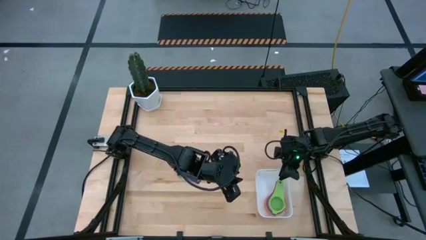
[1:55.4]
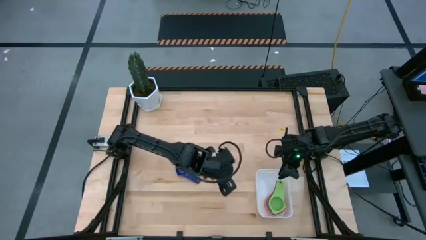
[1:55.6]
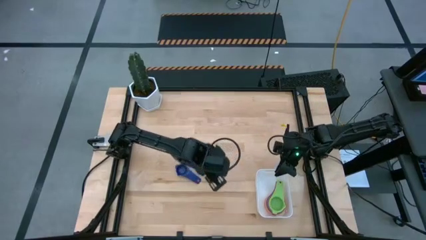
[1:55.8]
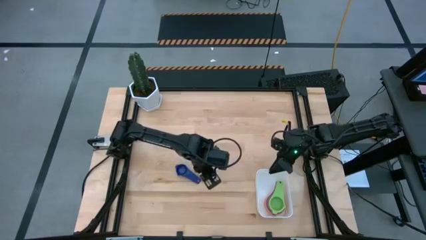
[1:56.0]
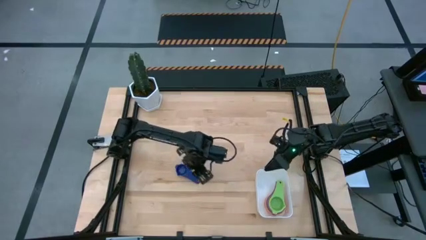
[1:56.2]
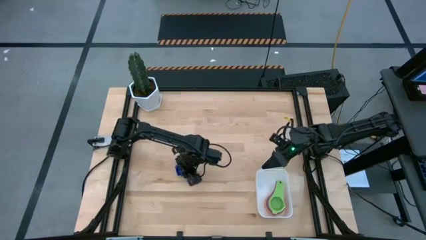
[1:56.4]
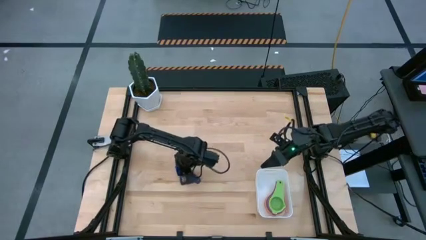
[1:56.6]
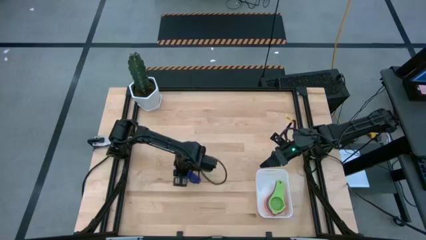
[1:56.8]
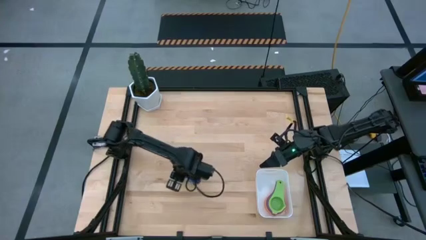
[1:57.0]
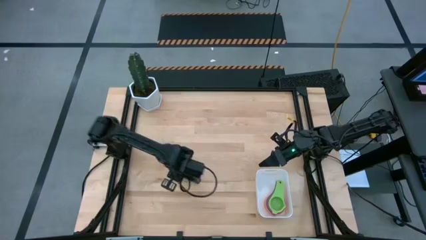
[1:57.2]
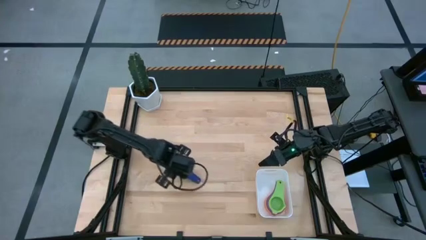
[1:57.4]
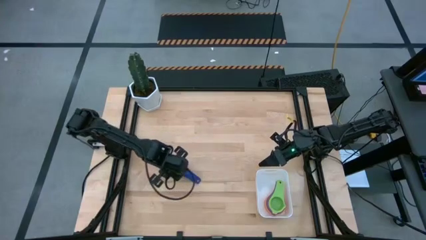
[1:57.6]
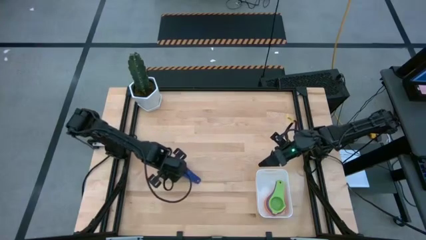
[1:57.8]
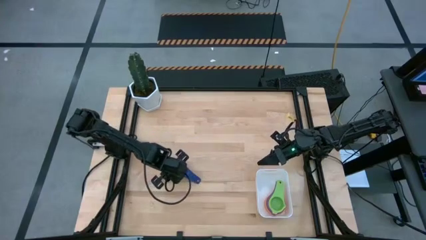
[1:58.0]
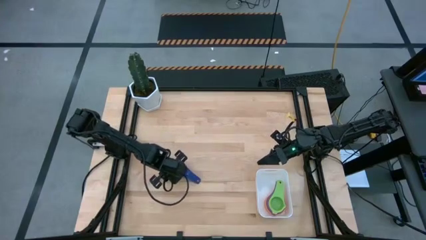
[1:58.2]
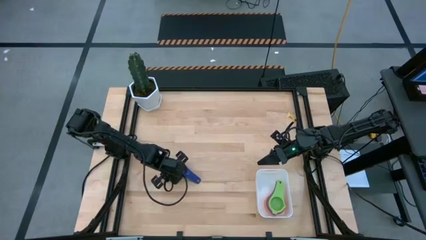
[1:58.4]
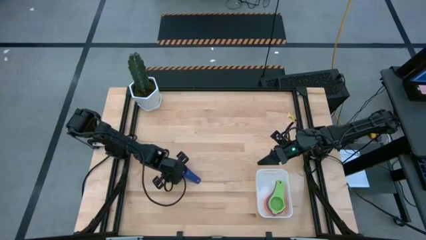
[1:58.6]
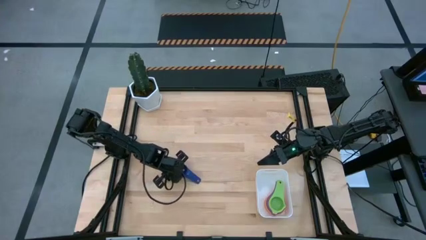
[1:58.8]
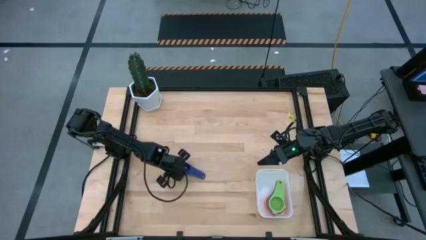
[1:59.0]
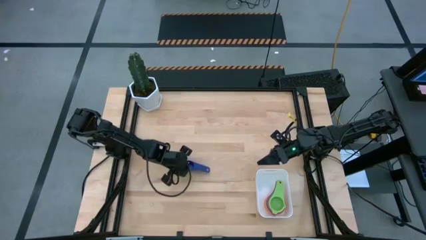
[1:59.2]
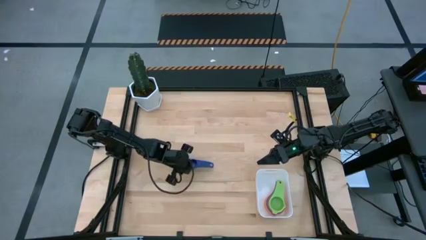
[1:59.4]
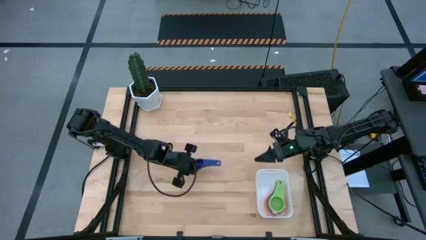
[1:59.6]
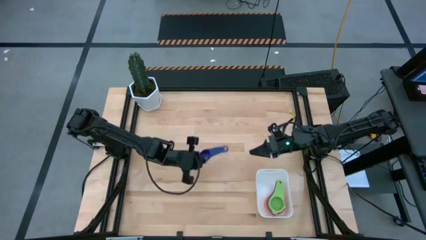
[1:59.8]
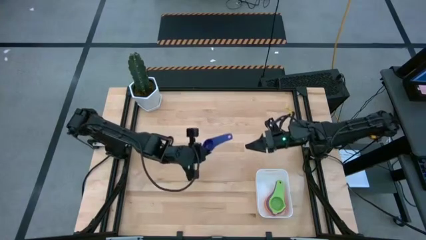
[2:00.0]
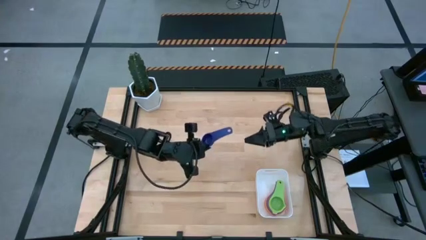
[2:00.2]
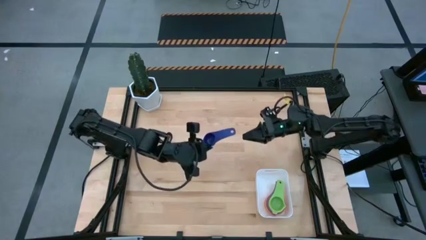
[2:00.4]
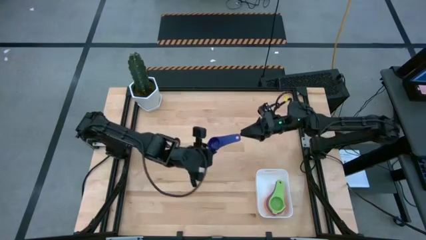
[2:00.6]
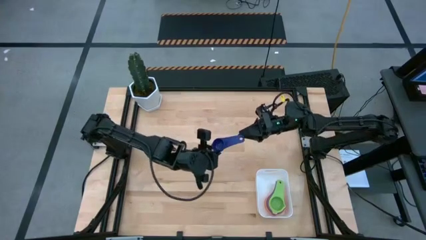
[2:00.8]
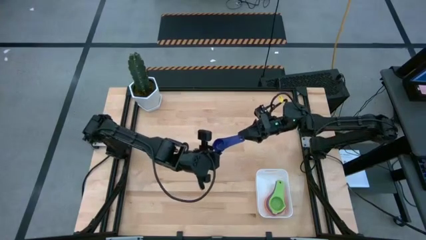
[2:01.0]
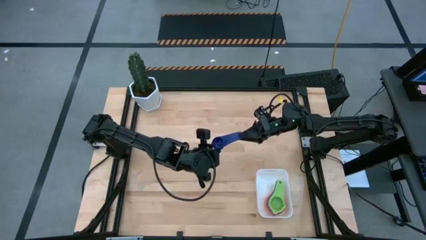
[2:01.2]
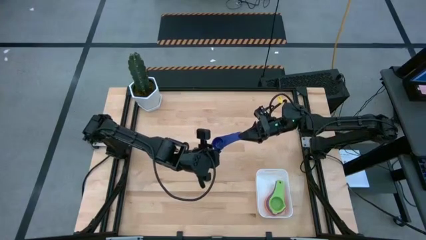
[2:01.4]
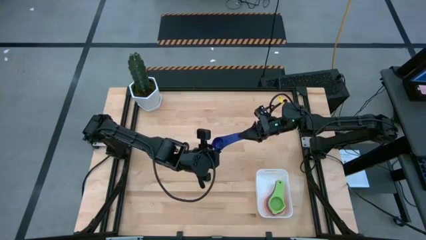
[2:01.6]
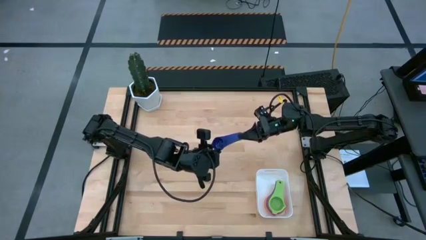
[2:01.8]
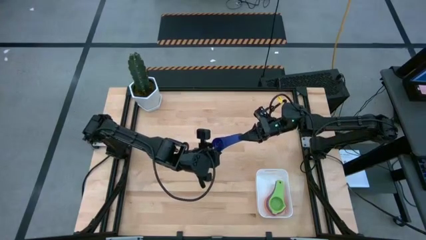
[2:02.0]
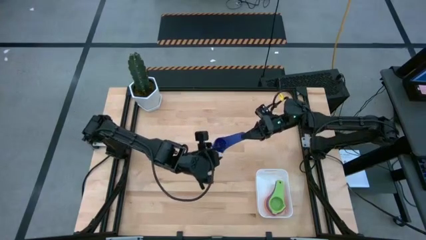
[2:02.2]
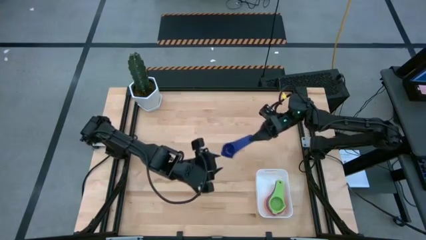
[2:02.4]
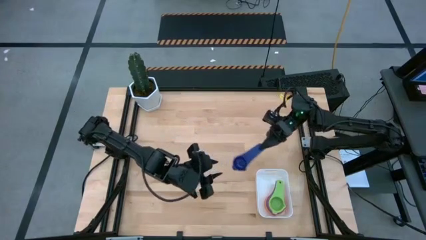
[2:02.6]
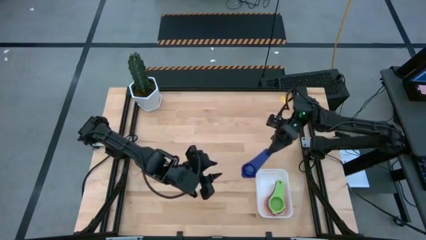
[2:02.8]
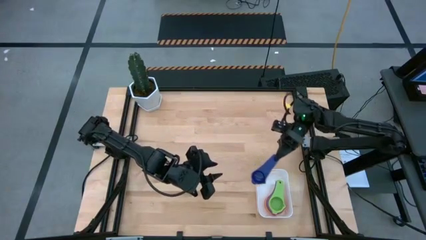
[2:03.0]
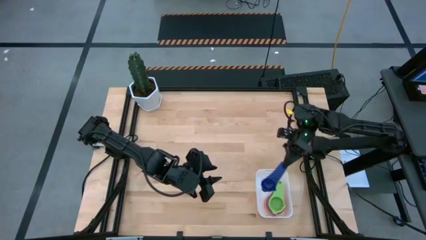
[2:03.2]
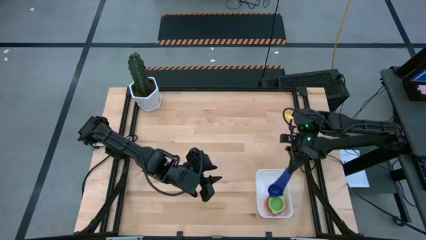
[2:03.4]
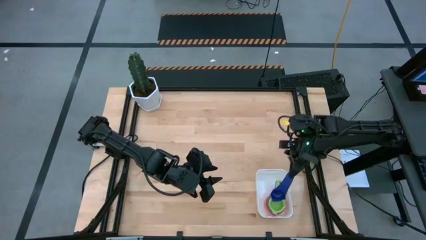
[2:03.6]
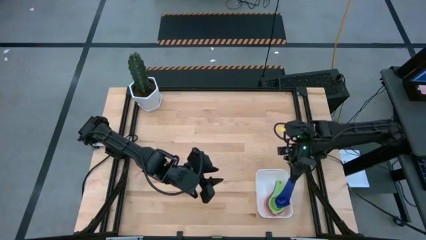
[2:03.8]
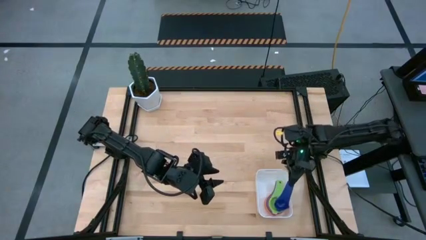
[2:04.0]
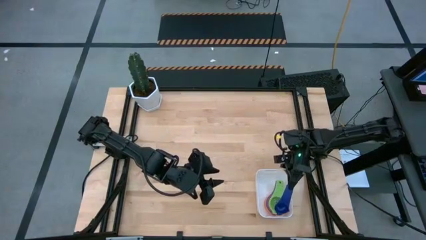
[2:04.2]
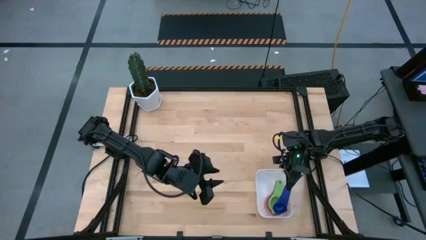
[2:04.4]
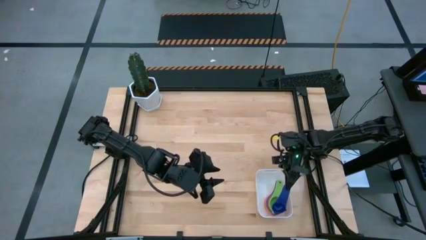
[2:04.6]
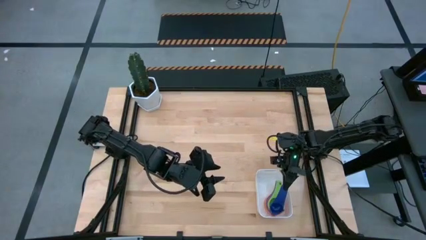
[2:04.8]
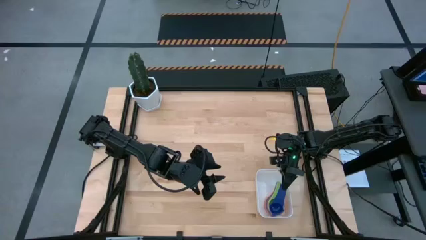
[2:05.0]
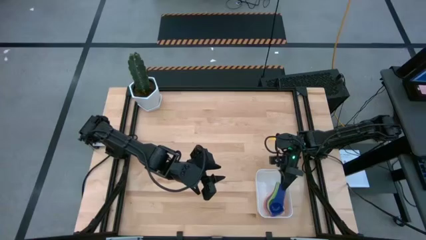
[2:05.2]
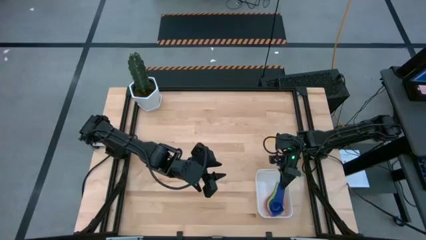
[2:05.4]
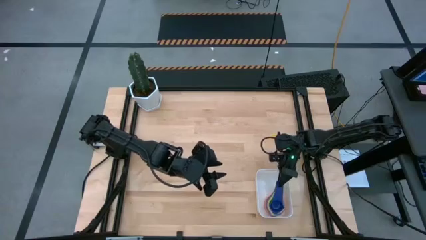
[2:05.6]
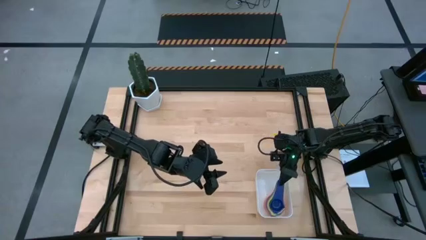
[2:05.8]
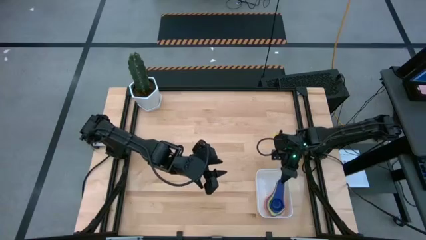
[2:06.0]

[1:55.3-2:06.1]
Task: Nest measuring cups in basket
Stack the dark blue measuring cup on top of the green measuring cup into the white bin
